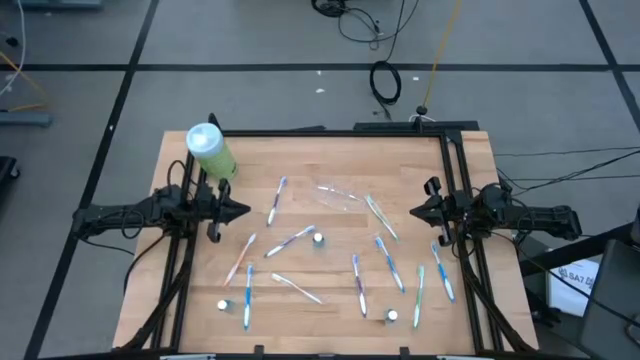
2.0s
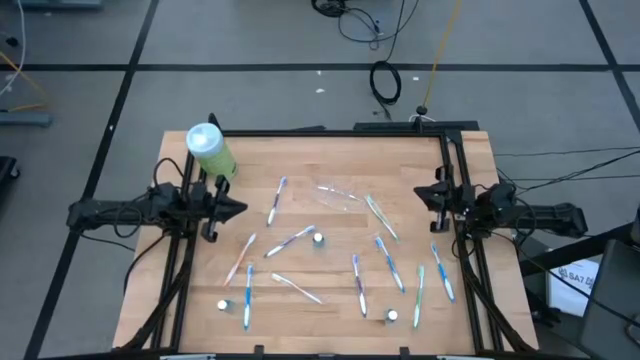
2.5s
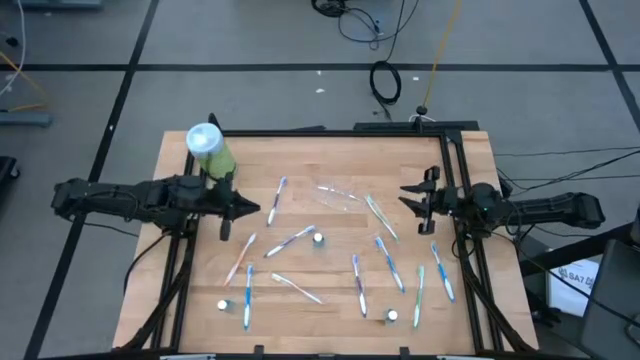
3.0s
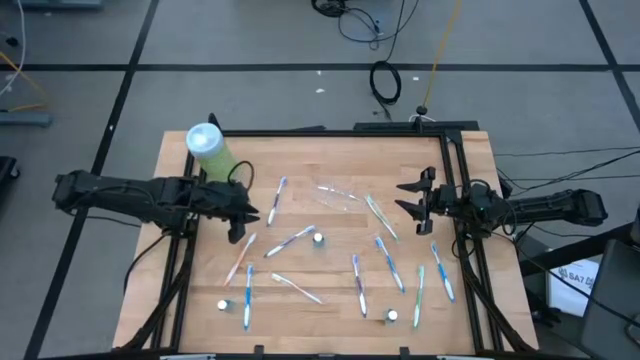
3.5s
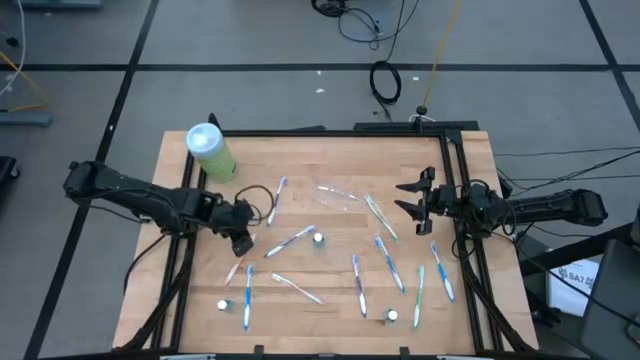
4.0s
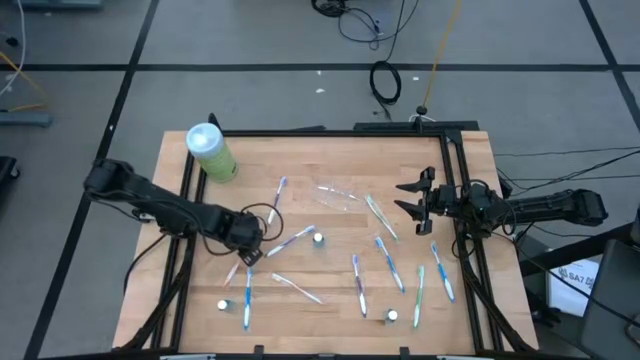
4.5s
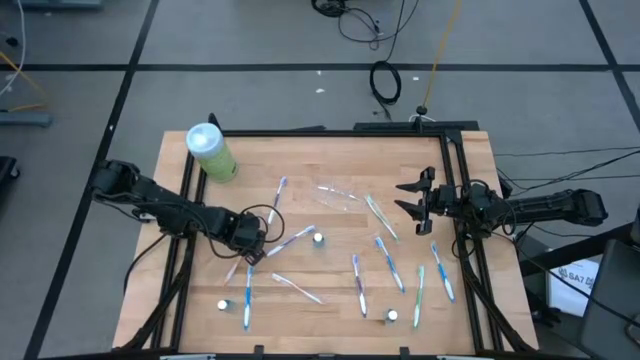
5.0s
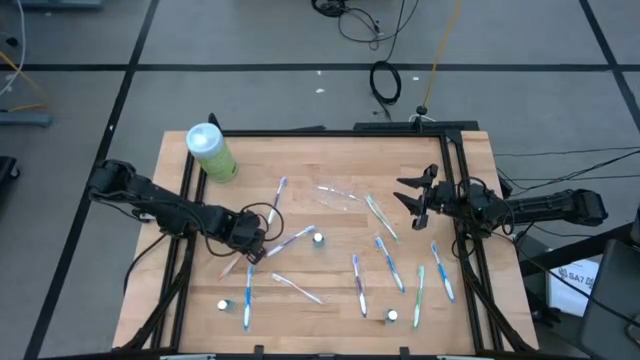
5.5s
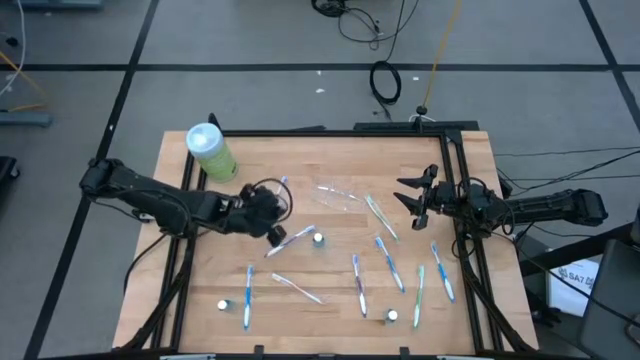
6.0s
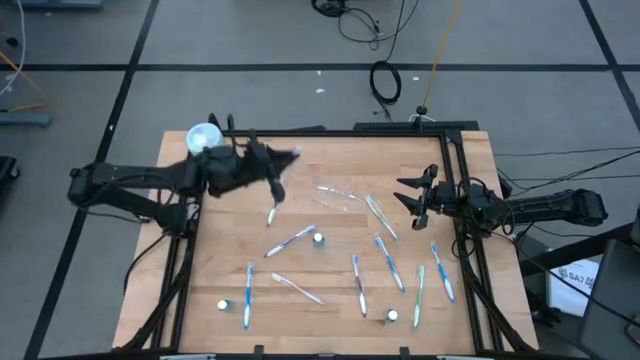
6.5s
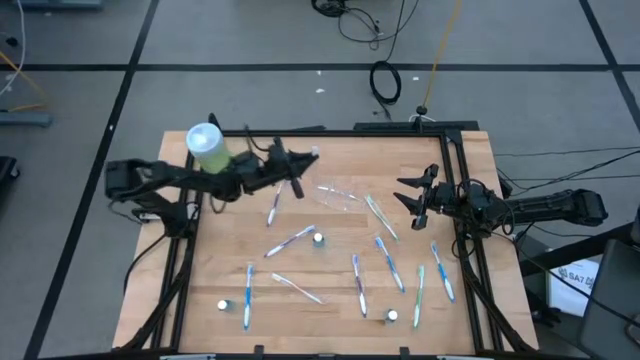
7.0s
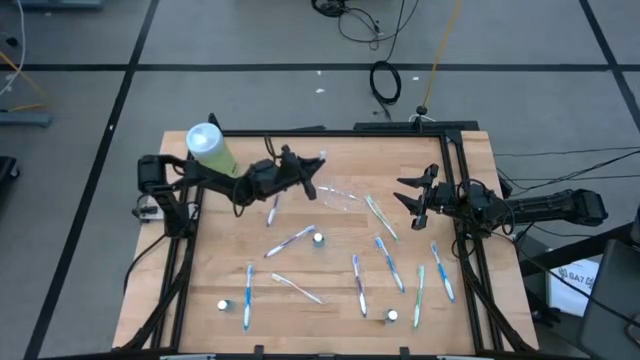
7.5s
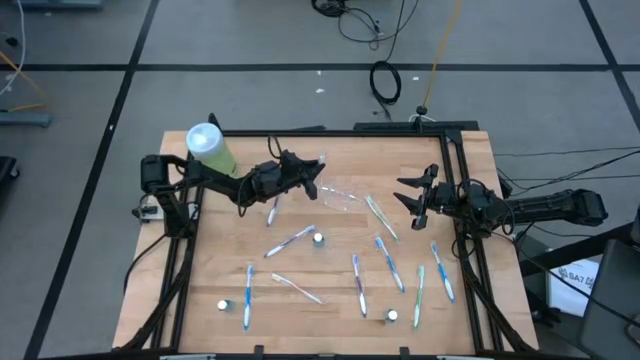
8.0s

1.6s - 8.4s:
Task: Pick & Place toothbrushing station
Put the top orange toothbrush into the transparent organizer

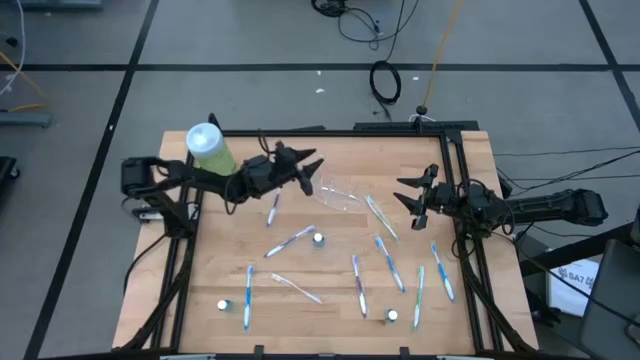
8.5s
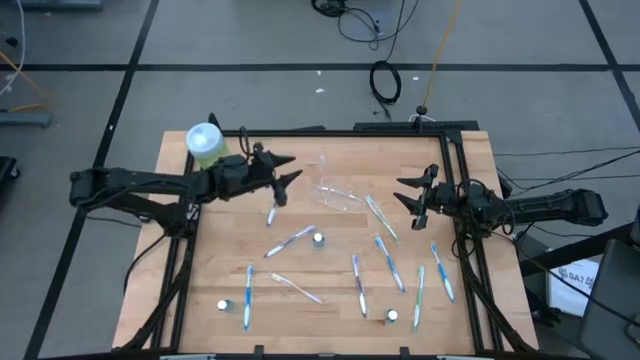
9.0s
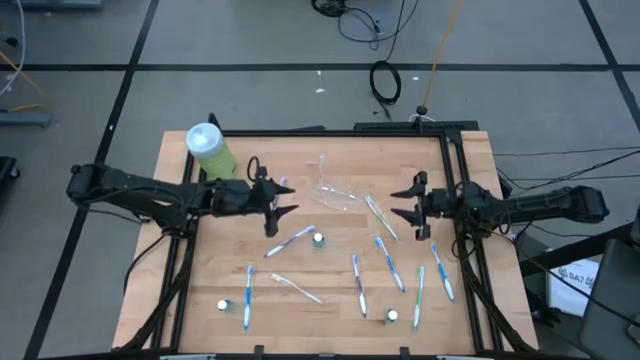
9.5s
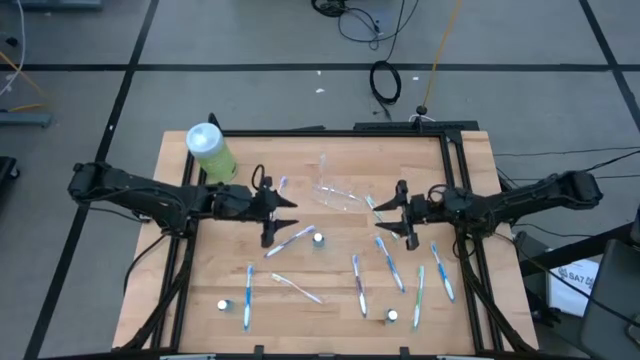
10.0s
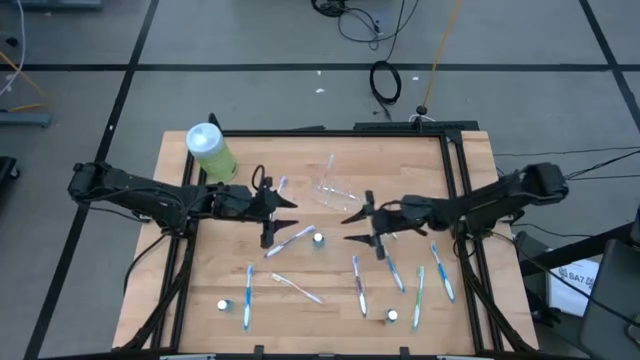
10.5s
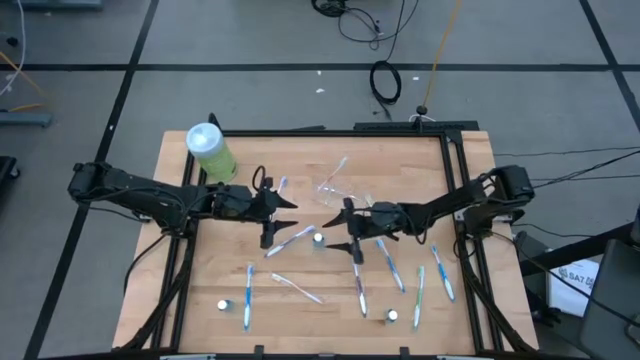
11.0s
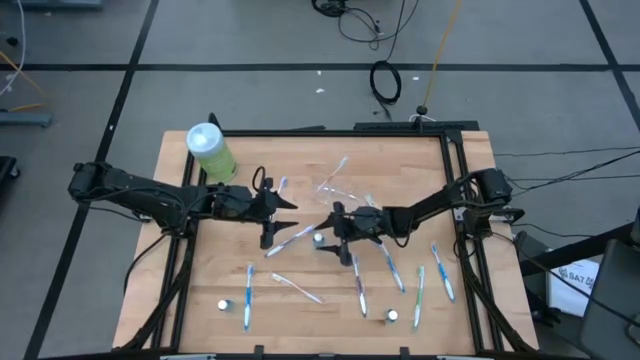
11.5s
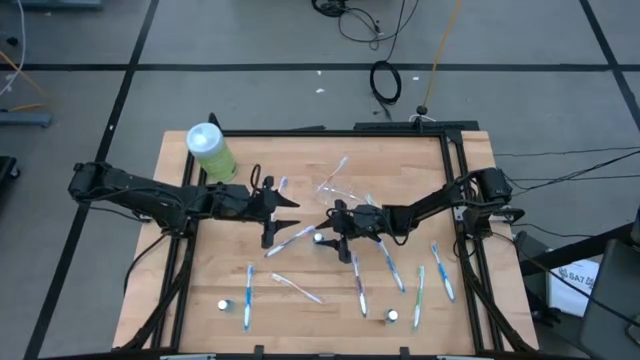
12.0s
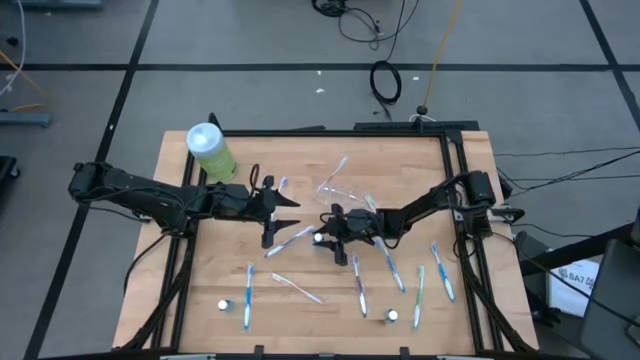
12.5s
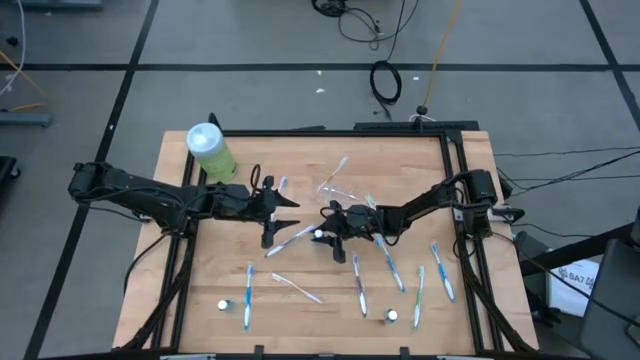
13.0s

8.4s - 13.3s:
Put the top blue mouthwash into the transparent organizer

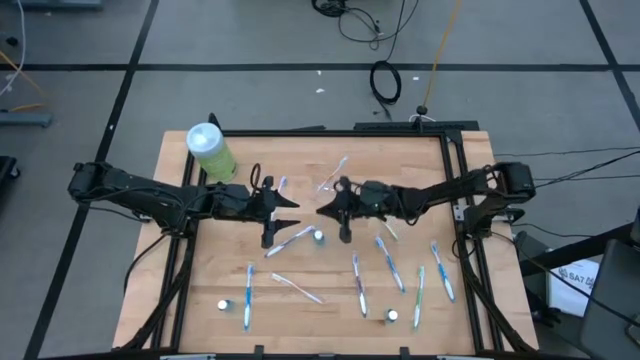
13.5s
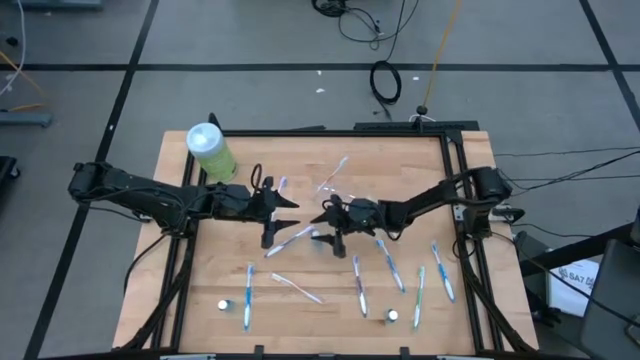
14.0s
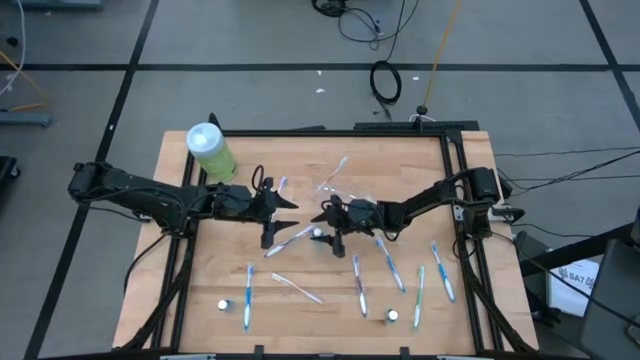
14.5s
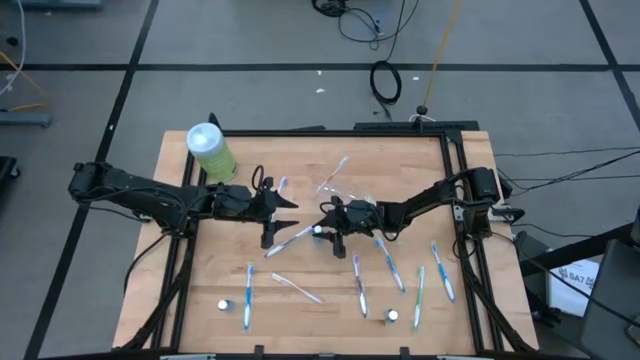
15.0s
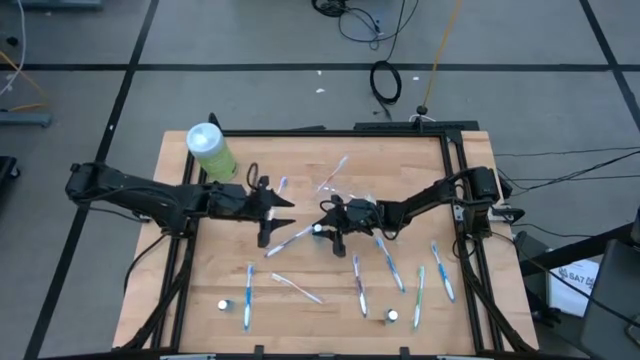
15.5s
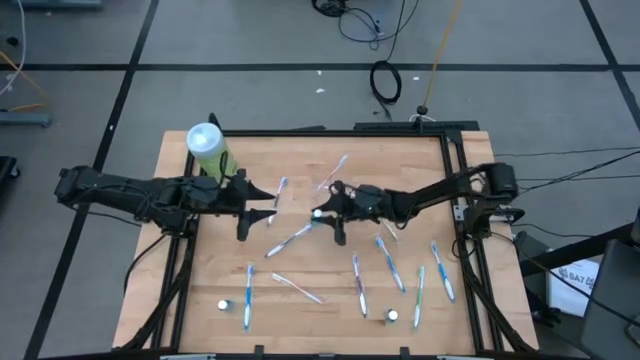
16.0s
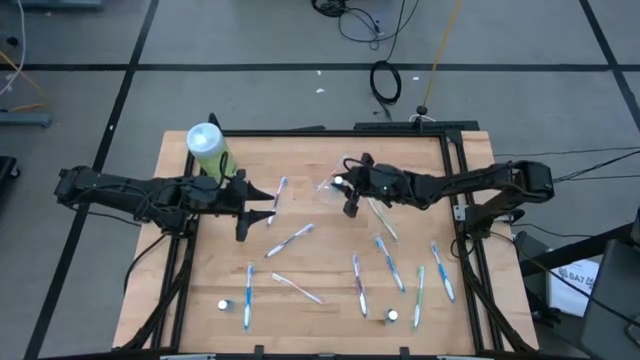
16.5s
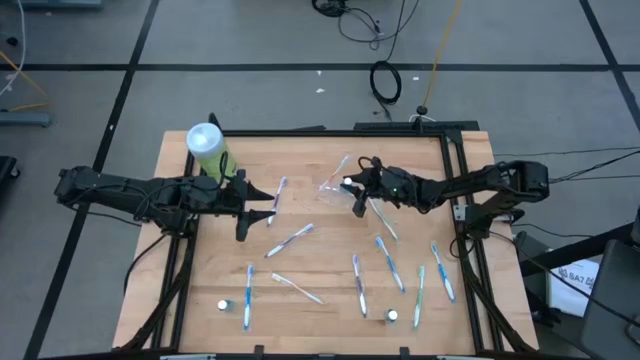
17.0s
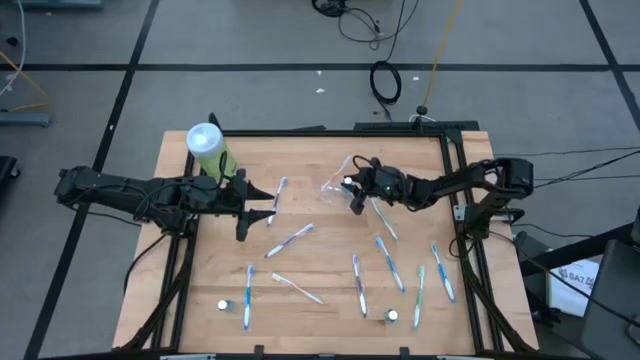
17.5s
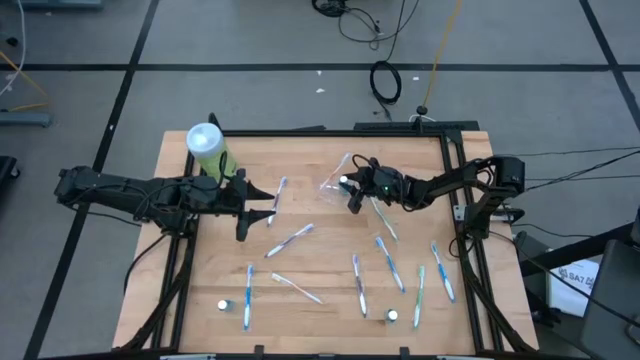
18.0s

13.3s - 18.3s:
Put the top blue mouthwash into the transparent organizer

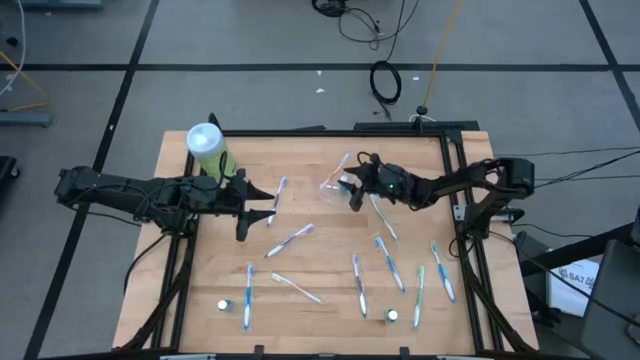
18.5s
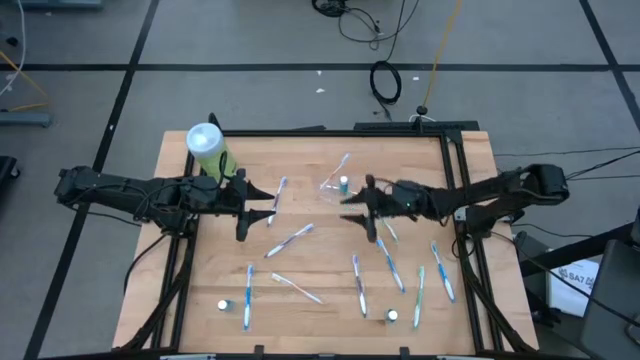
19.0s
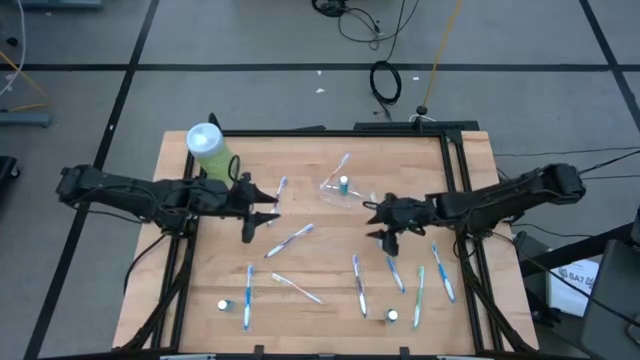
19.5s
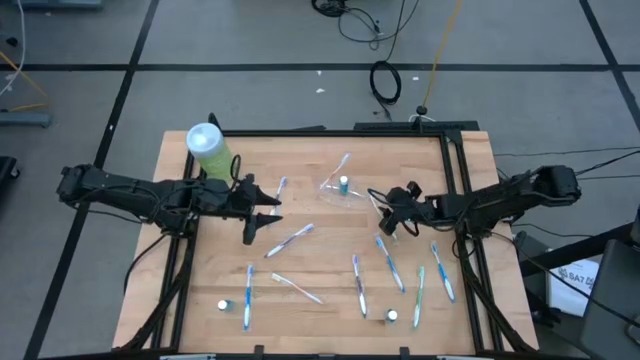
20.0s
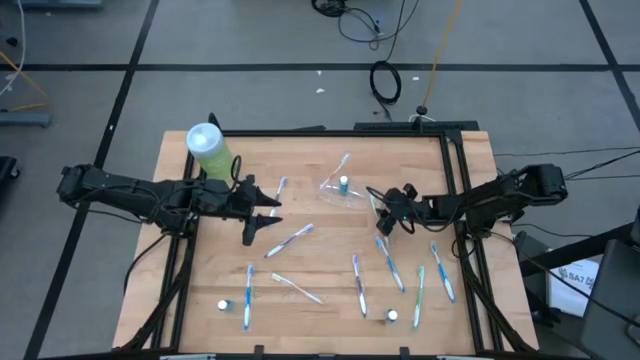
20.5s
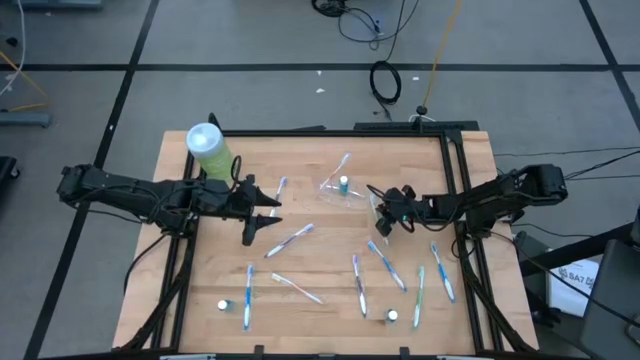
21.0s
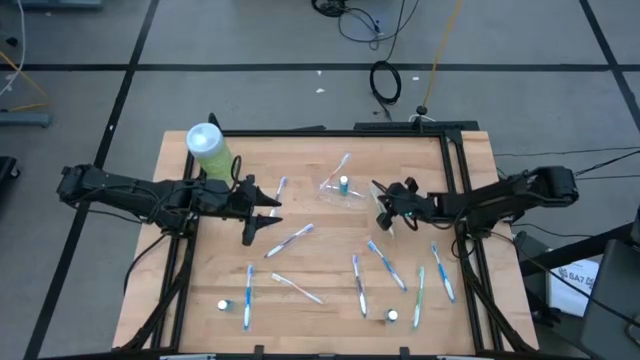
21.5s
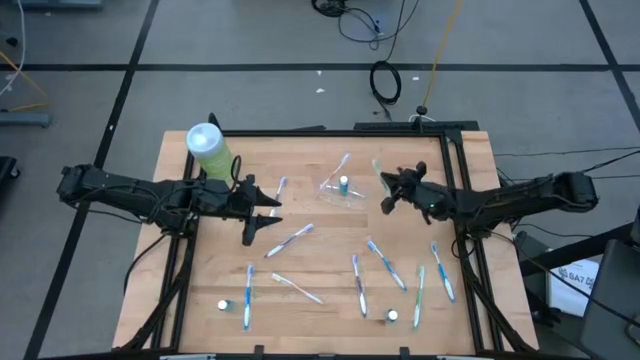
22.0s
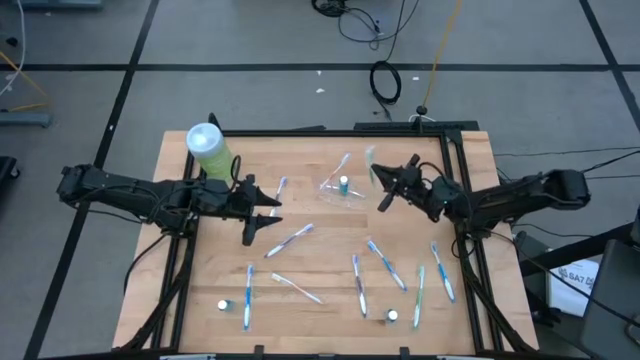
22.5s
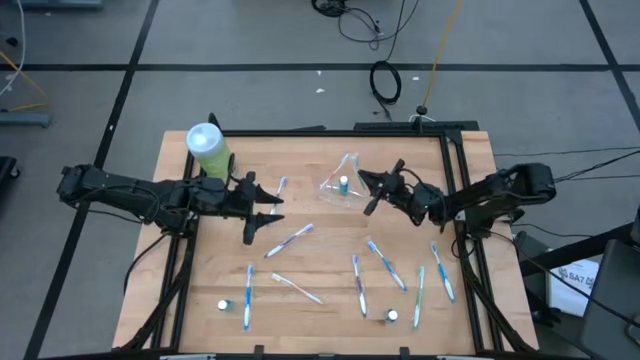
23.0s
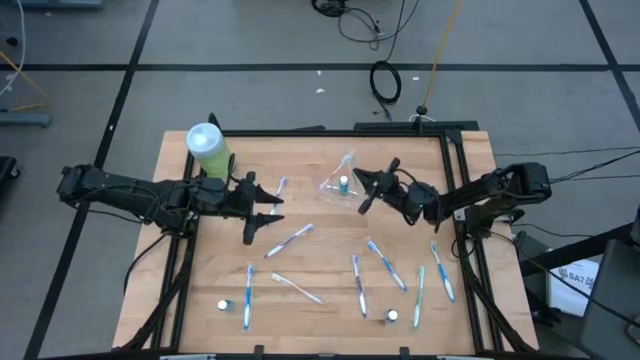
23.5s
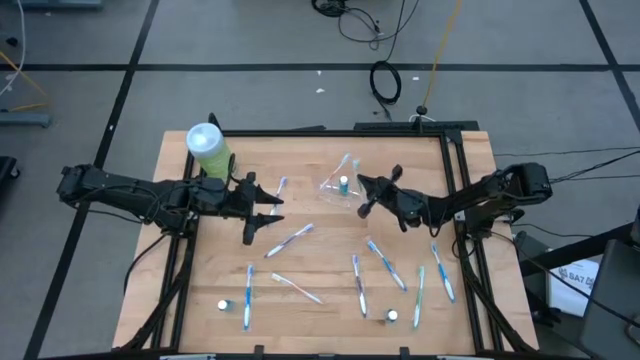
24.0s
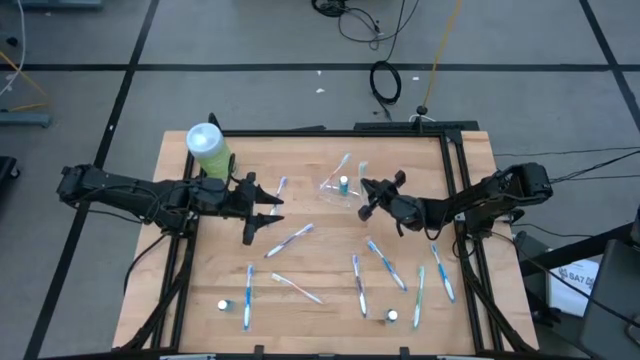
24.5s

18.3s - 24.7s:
Put the top green toothbrush into the transparent organizer
